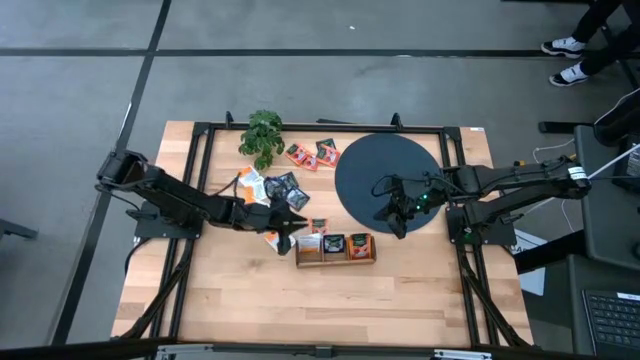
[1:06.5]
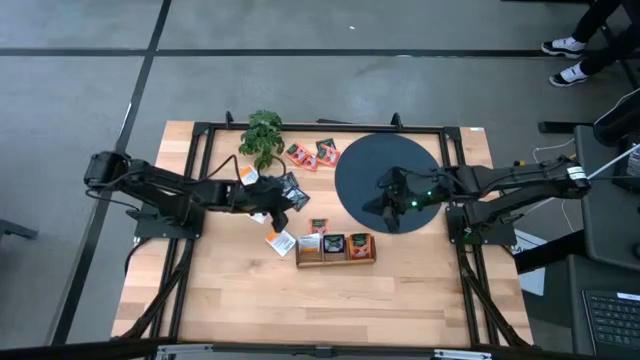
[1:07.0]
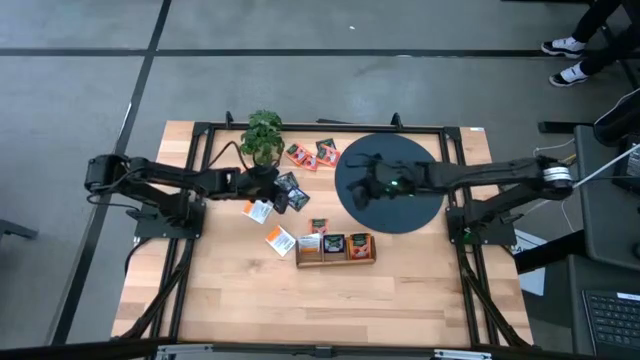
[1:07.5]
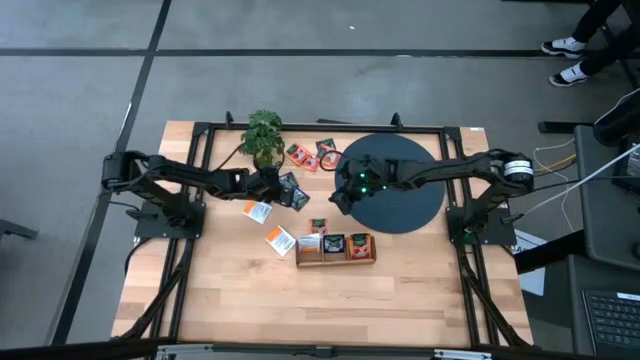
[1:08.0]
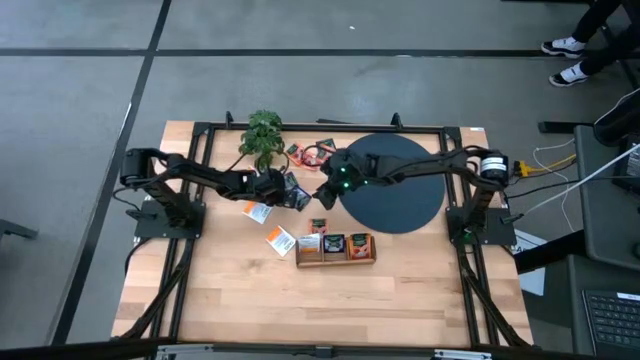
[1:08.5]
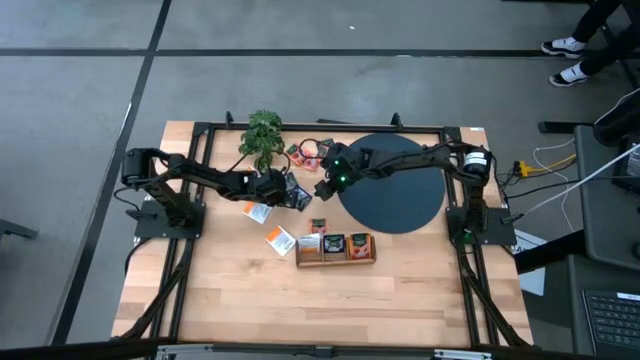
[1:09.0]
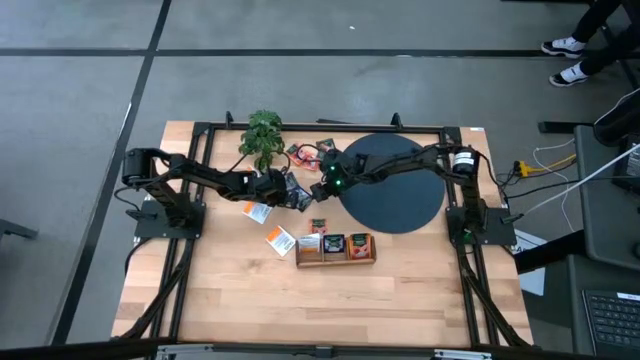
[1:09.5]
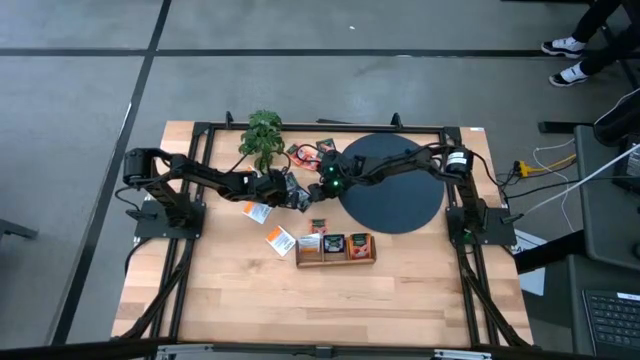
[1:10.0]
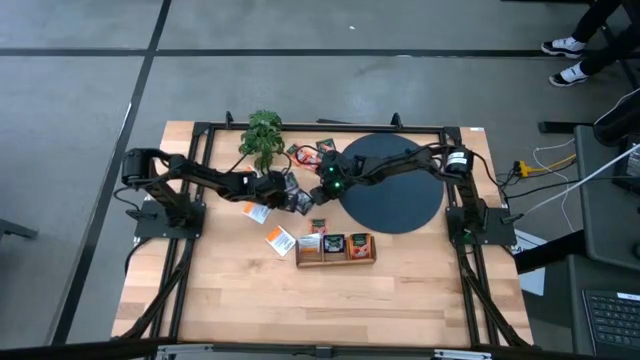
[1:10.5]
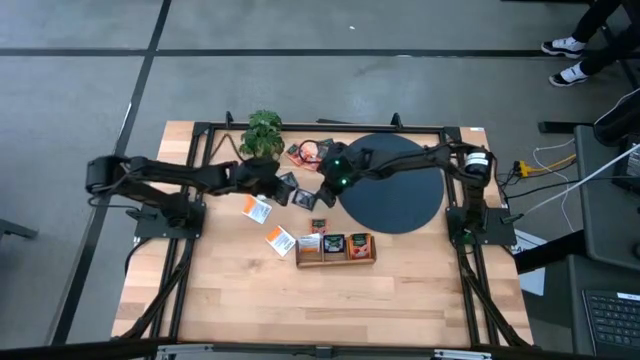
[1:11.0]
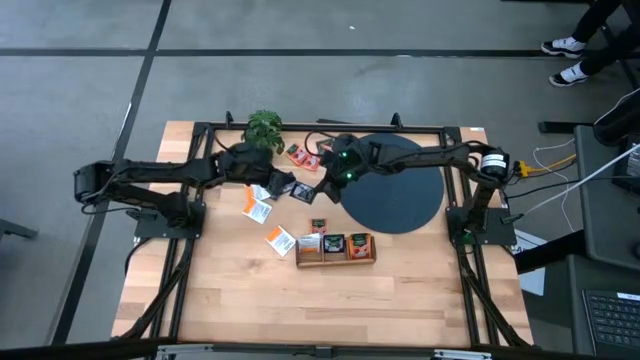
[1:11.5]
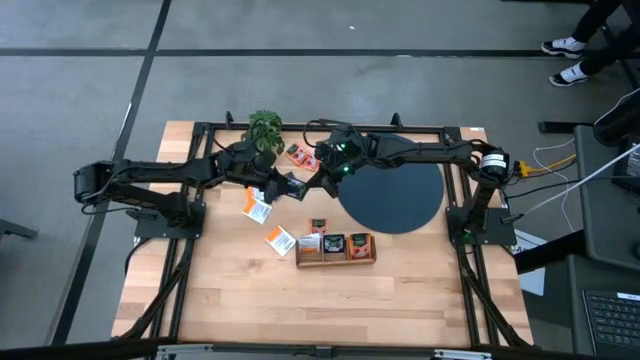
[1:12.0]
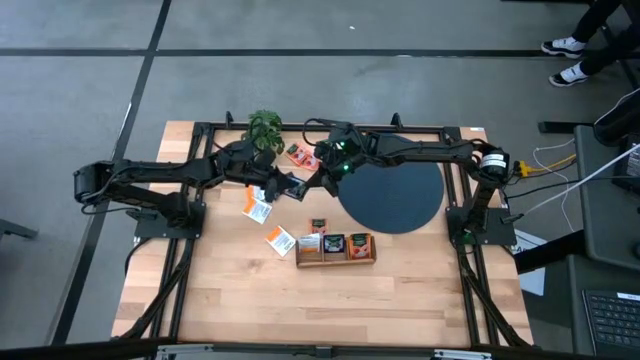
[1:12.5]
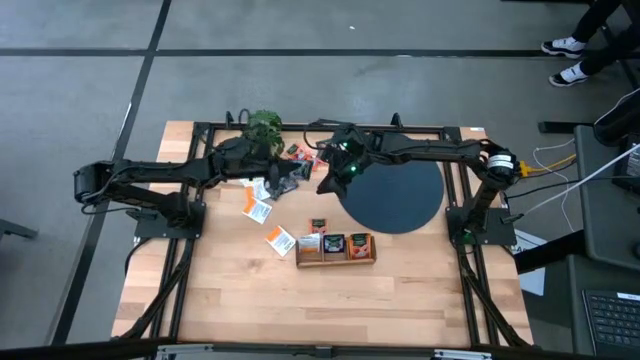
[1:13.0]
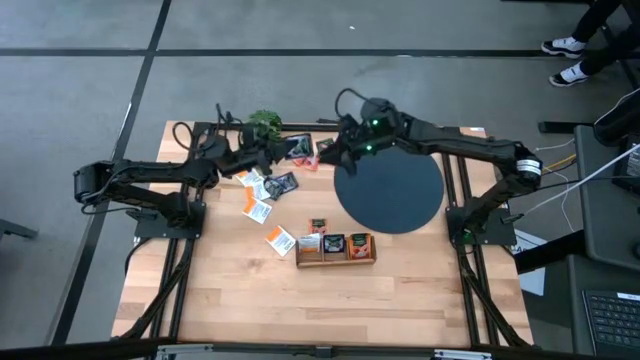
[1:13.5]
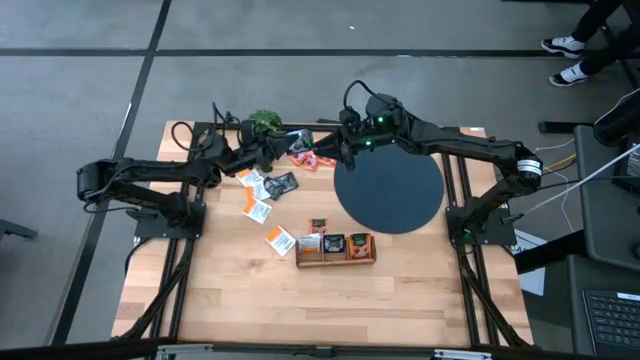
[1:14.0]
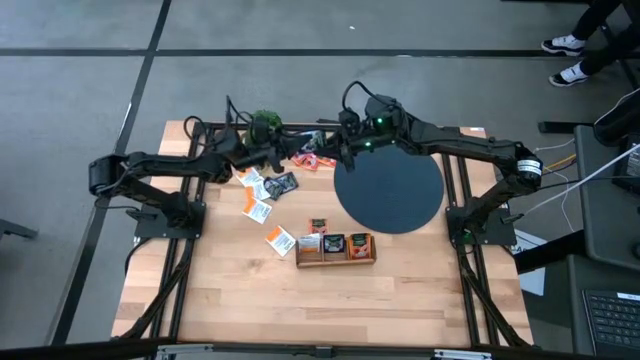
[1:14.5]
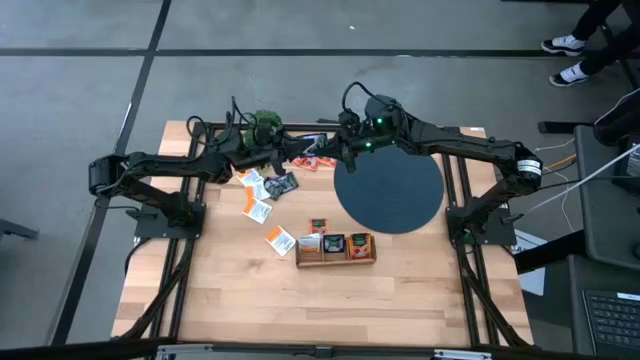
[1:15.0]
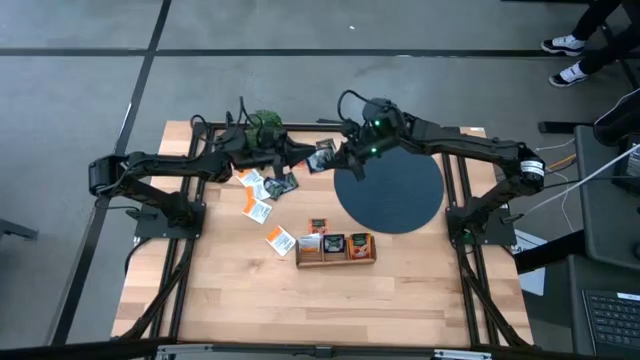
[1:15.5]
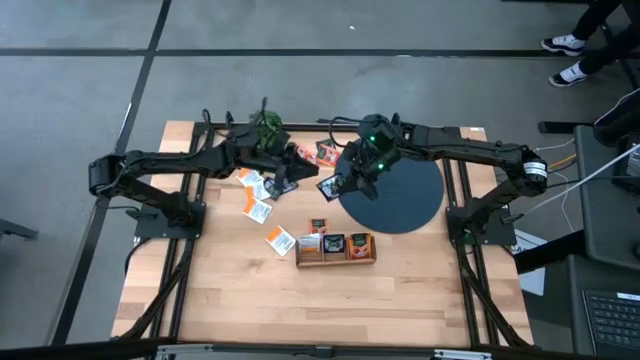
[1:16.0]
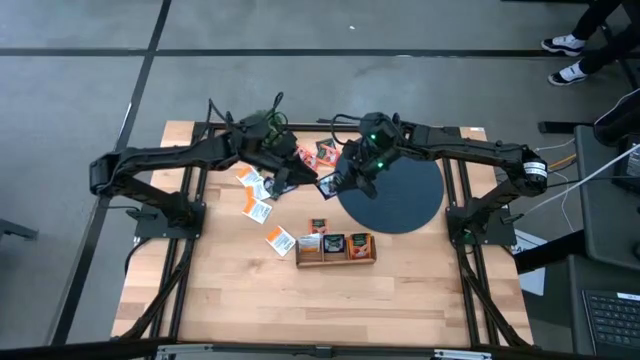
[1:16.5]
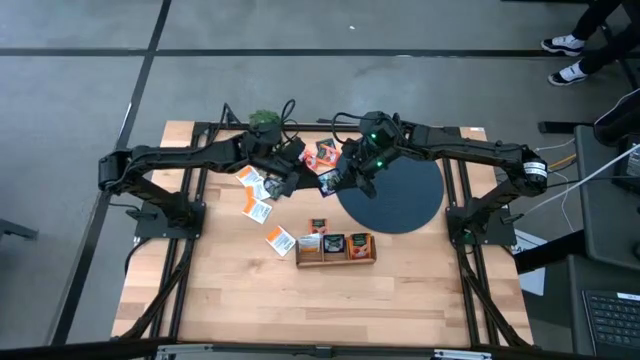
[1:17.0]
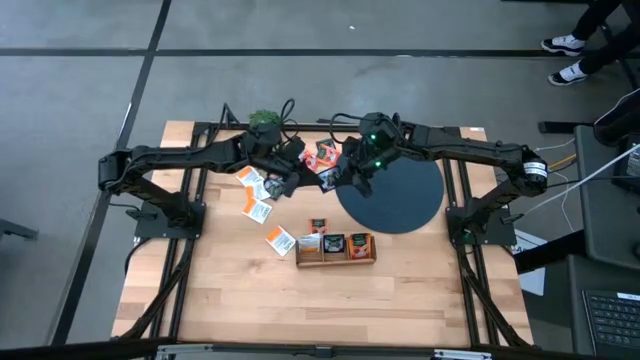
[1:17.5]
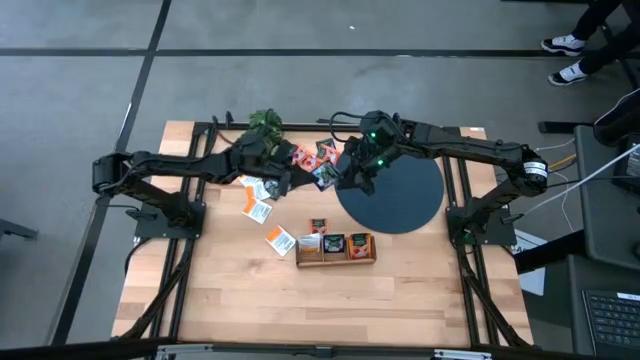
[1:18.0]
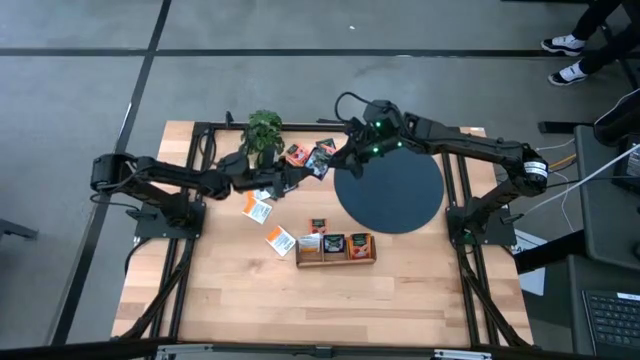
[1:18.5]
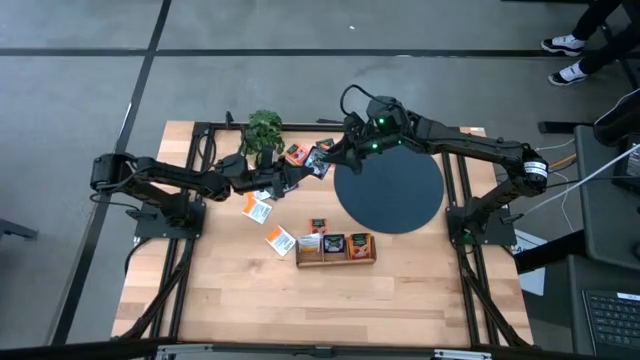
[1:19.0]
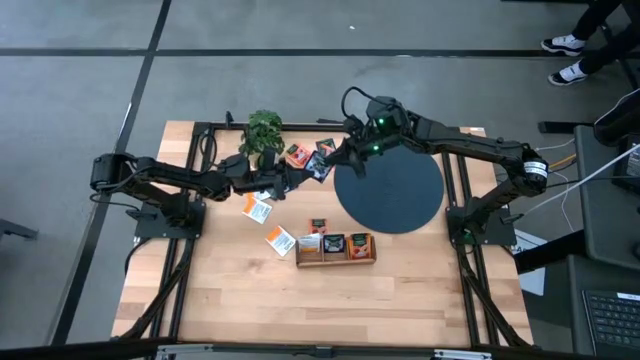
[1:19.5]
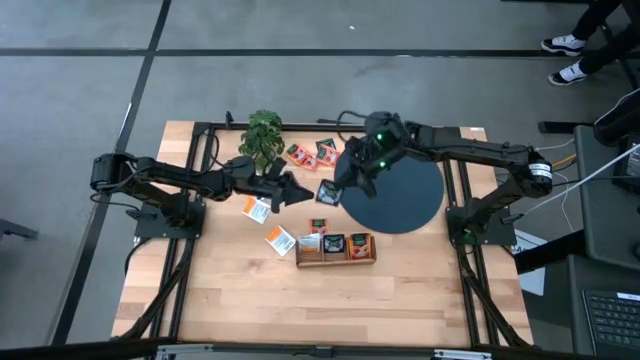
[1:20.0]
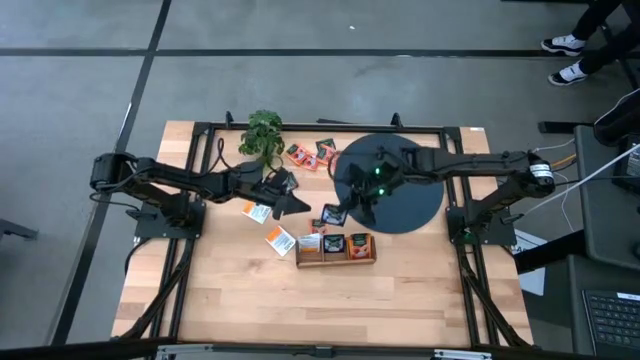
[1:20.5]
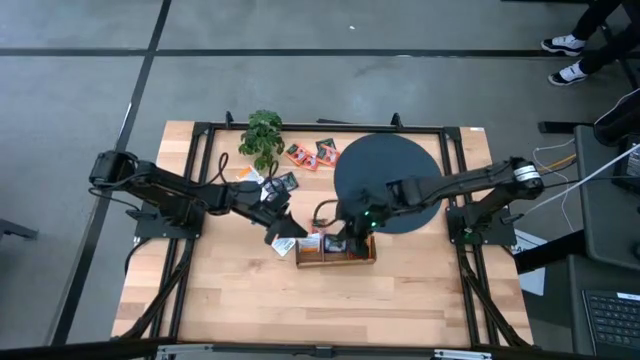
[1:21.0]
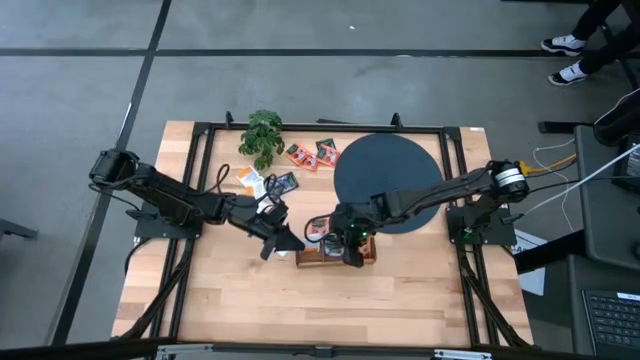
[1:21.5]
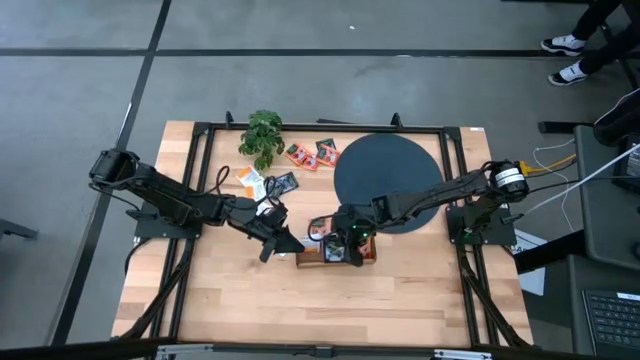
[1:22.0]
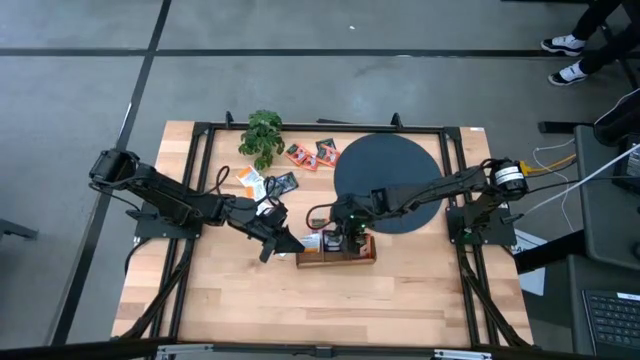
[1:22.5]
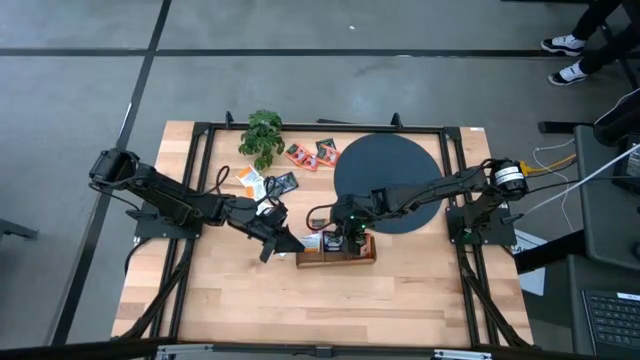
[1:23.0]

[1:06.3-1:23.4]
Task: Pick & Place Tea
Put the purple tea bag into the middle section of the wooden organizer

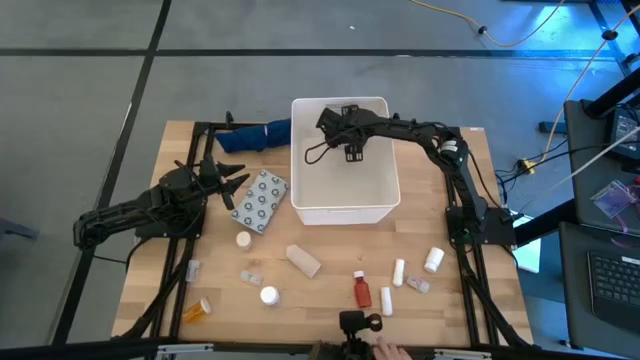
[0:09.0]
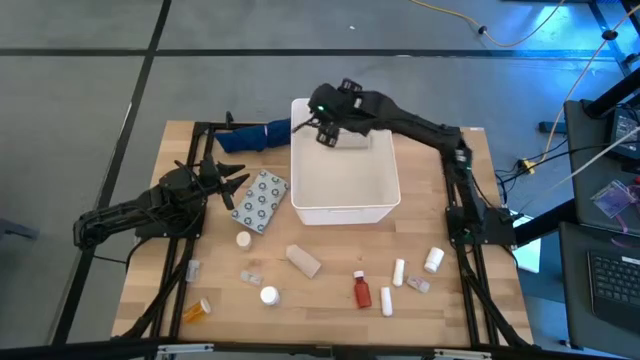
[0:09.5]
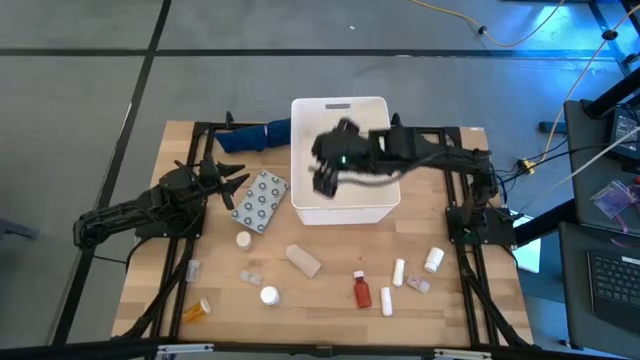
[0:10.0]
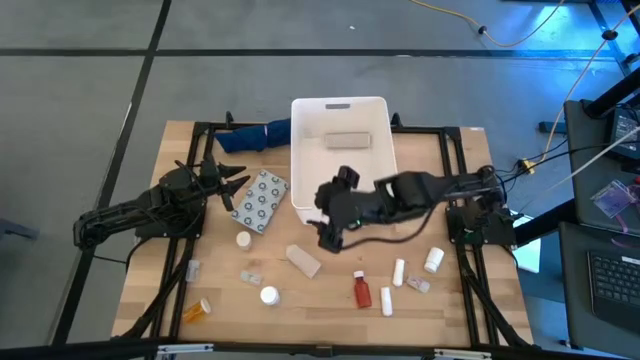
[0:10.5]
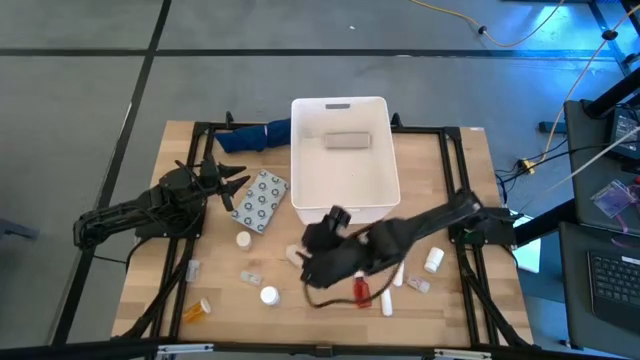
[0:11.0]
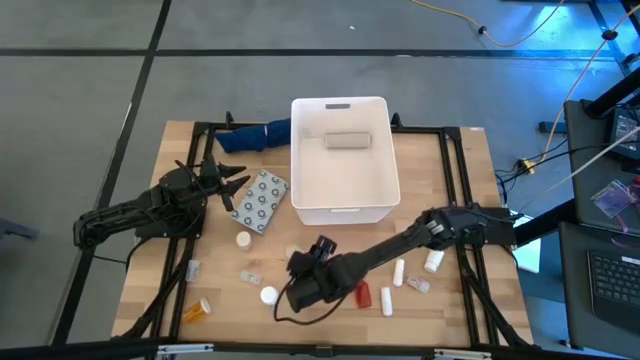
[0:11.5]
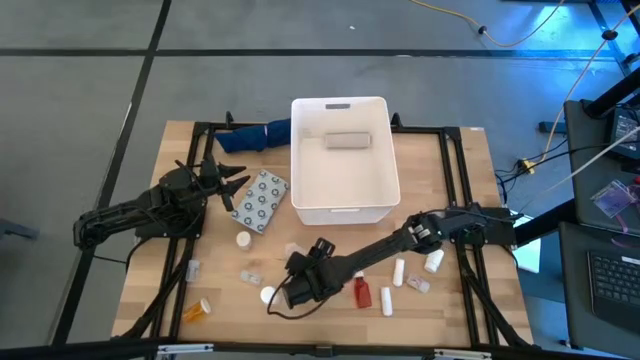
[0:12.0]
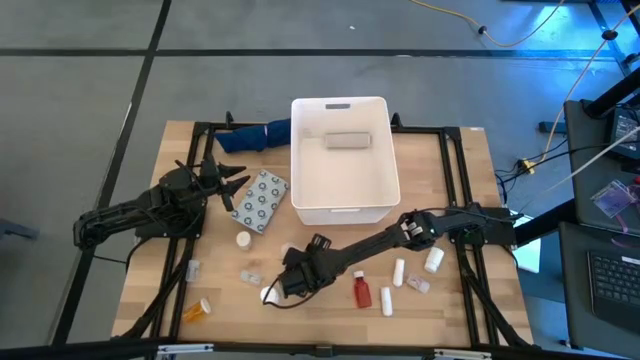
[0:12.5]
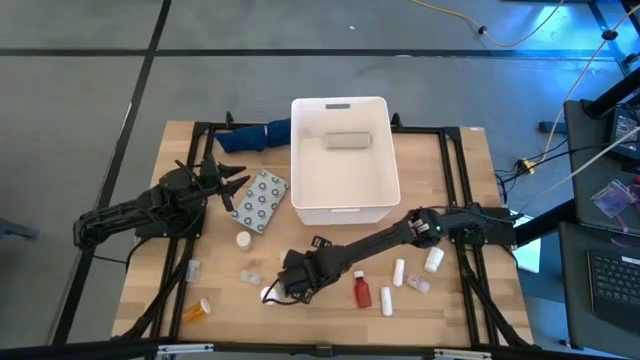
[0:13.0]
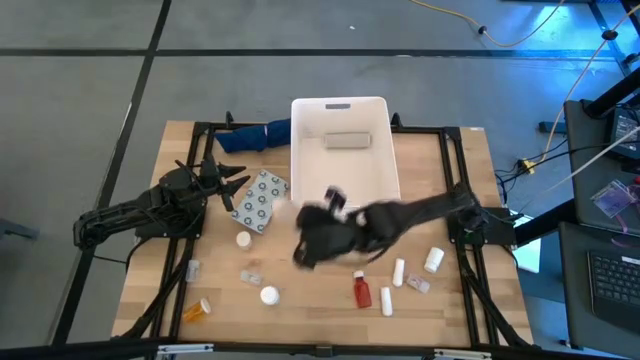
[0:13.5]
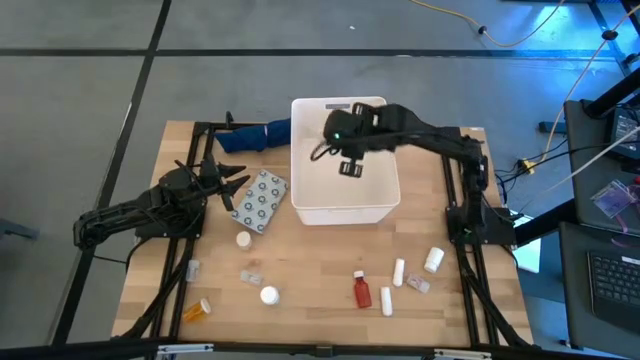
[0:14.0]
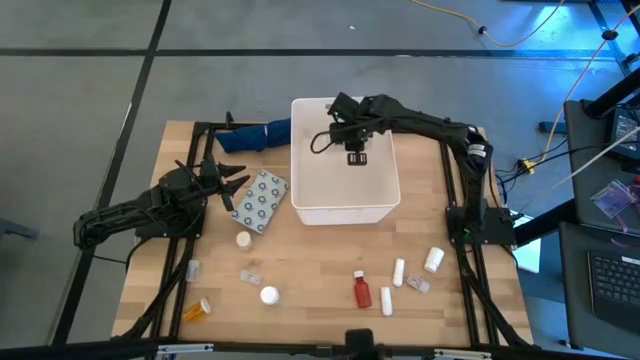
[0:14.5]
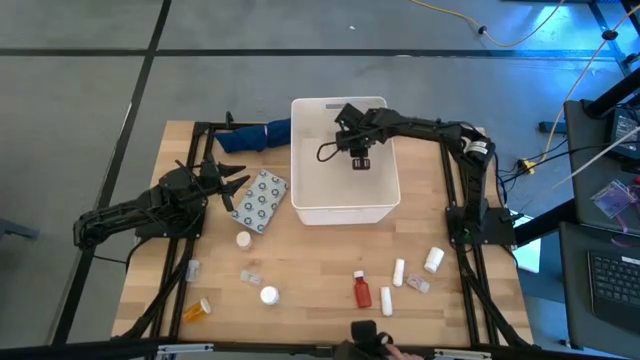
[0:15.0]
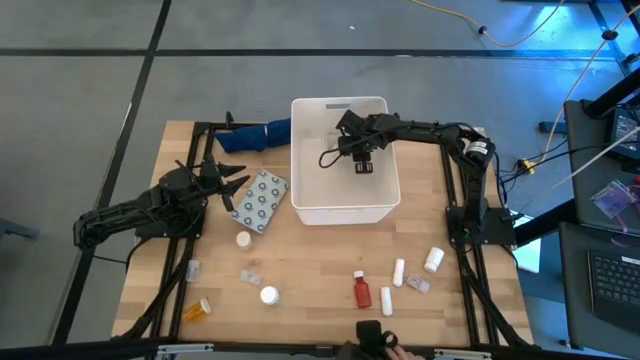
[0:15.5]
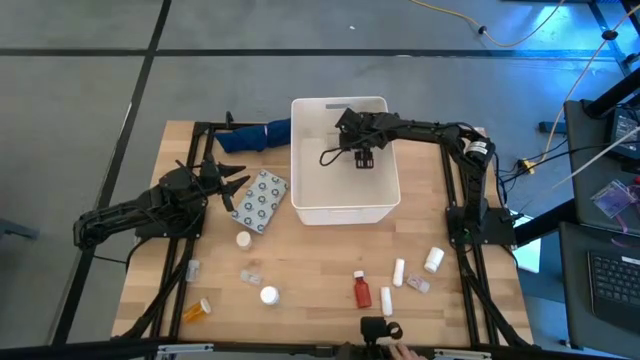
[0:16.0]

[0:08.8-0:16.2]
Task: Pick & place medical supplies in basket/bin
Put the right white bandage into the bin
